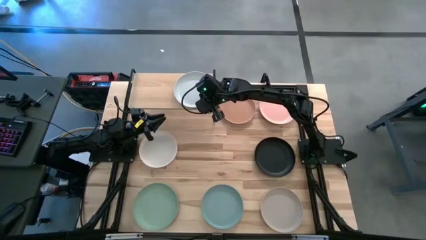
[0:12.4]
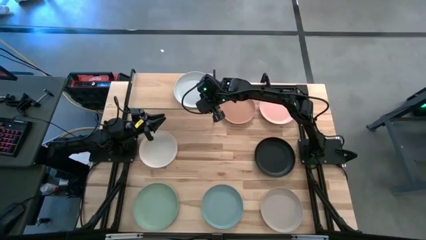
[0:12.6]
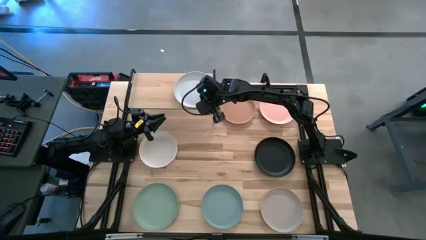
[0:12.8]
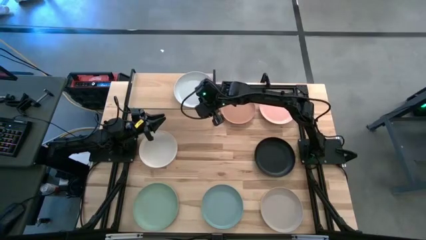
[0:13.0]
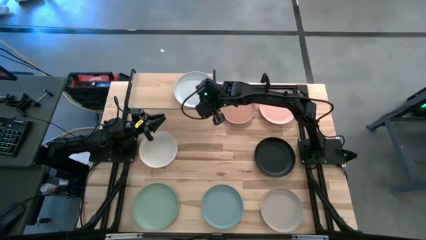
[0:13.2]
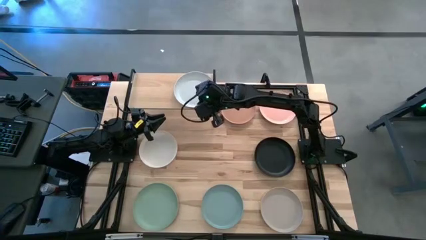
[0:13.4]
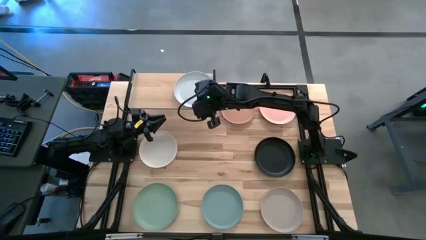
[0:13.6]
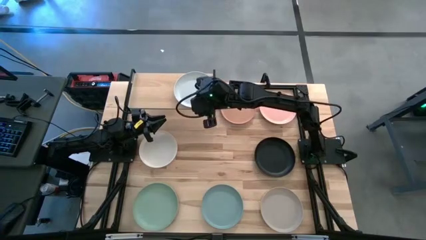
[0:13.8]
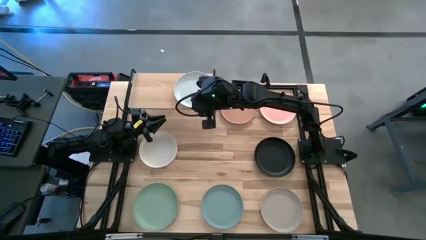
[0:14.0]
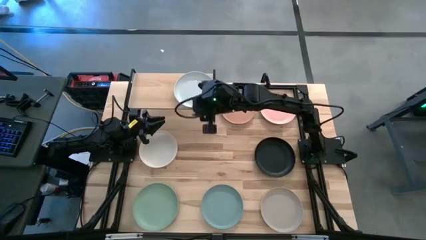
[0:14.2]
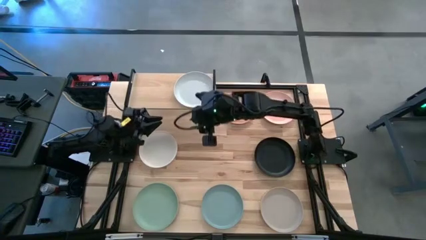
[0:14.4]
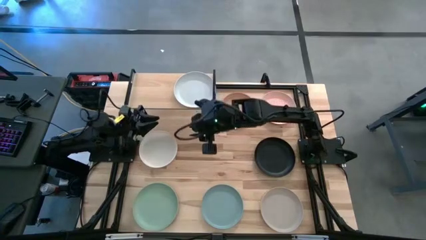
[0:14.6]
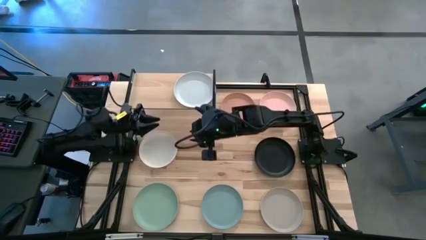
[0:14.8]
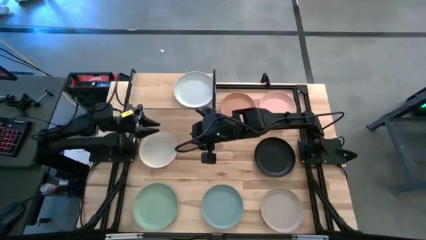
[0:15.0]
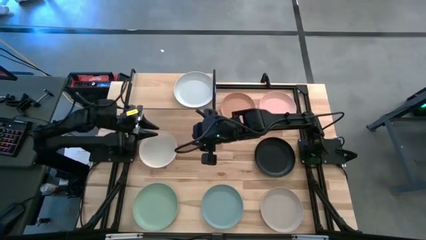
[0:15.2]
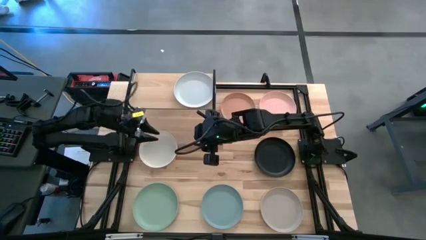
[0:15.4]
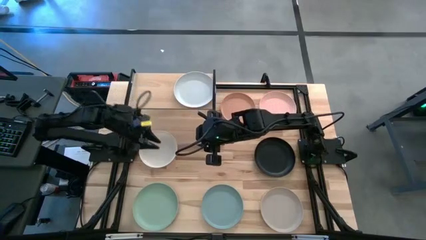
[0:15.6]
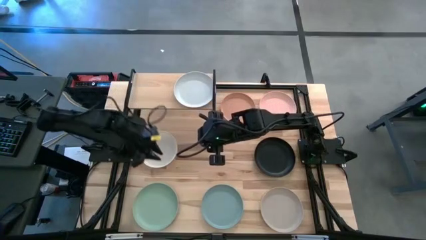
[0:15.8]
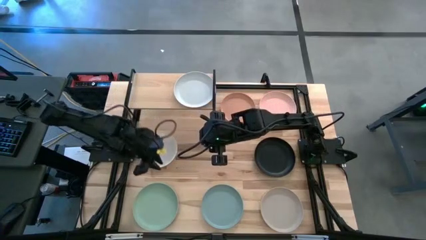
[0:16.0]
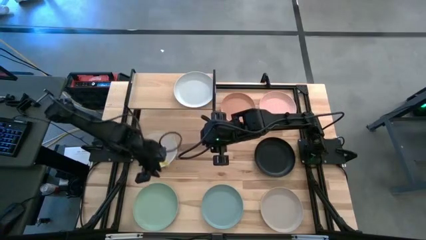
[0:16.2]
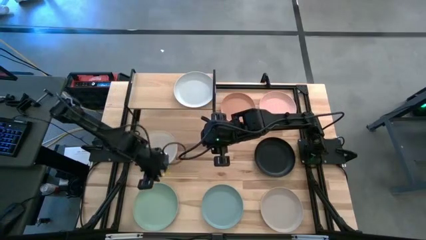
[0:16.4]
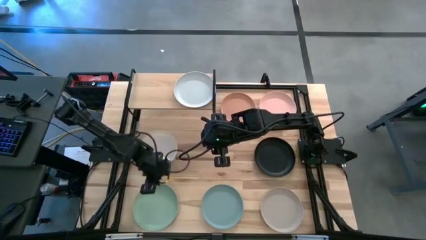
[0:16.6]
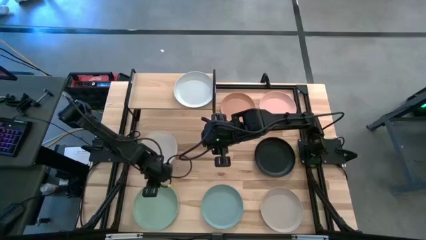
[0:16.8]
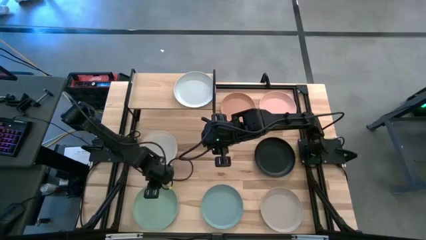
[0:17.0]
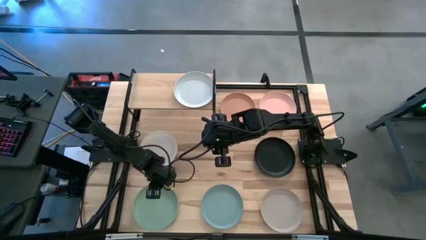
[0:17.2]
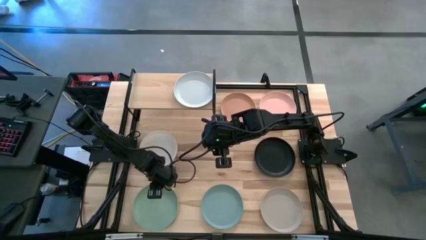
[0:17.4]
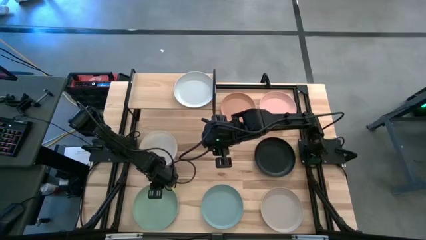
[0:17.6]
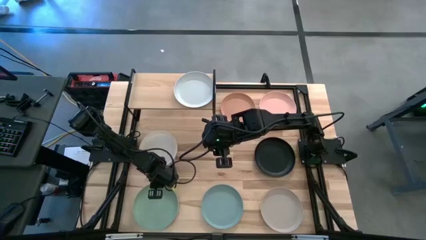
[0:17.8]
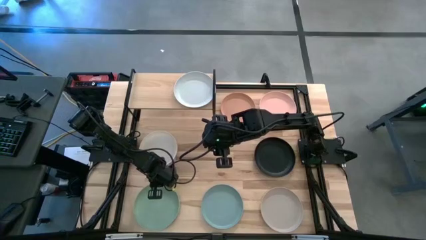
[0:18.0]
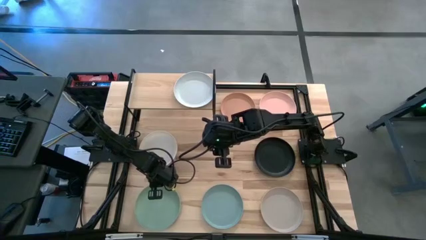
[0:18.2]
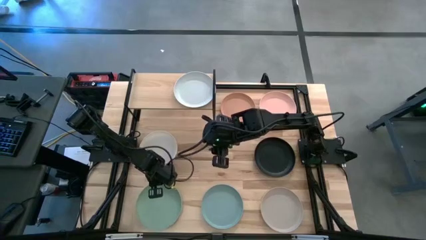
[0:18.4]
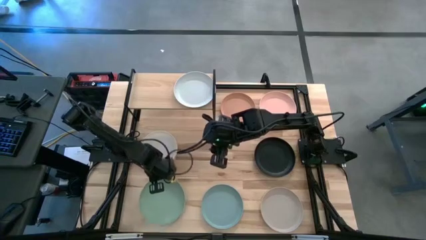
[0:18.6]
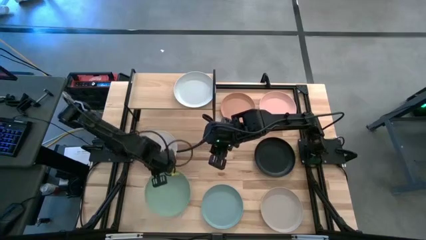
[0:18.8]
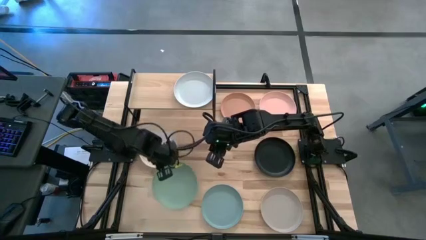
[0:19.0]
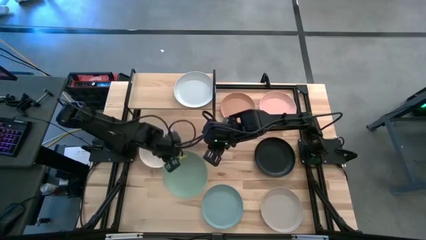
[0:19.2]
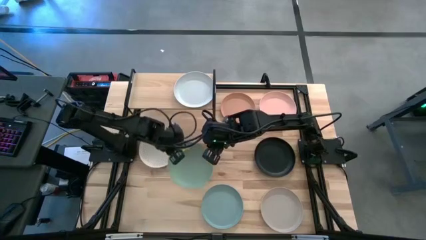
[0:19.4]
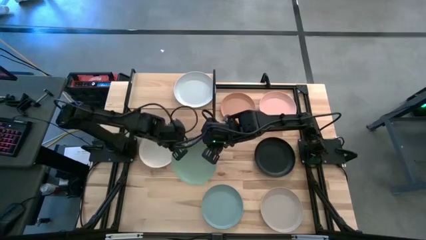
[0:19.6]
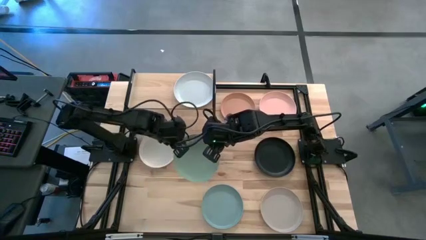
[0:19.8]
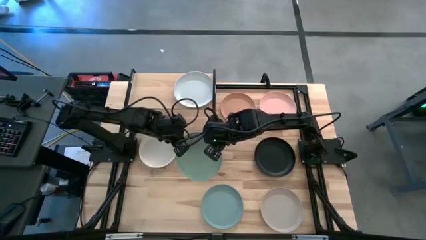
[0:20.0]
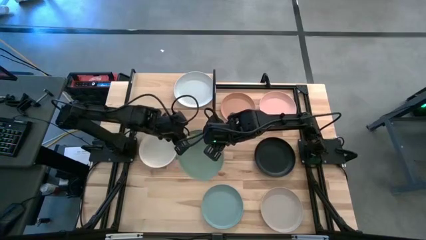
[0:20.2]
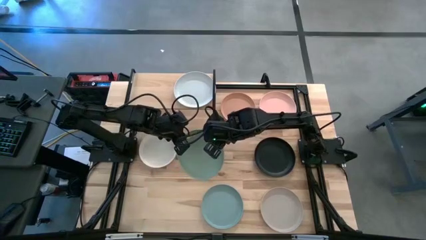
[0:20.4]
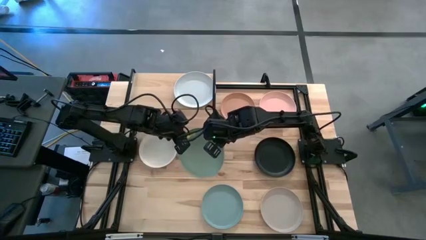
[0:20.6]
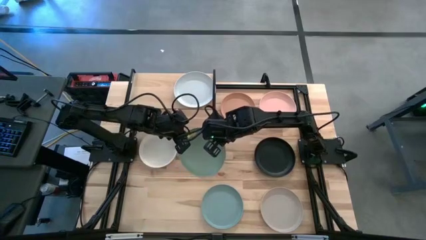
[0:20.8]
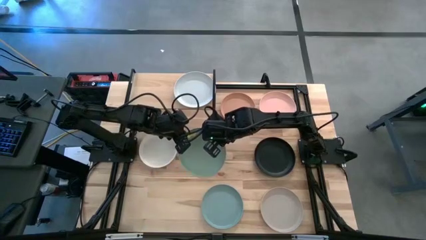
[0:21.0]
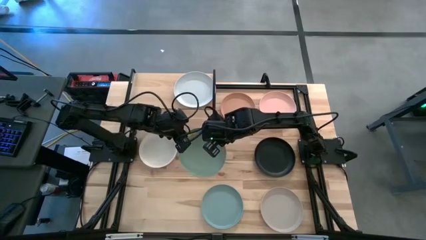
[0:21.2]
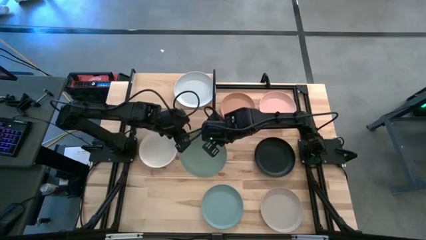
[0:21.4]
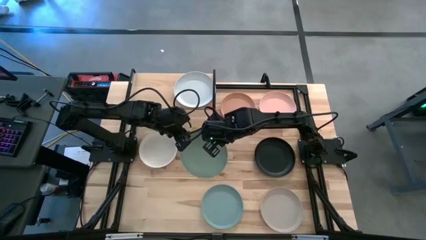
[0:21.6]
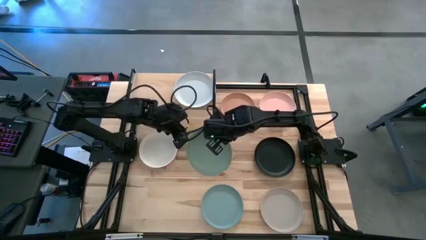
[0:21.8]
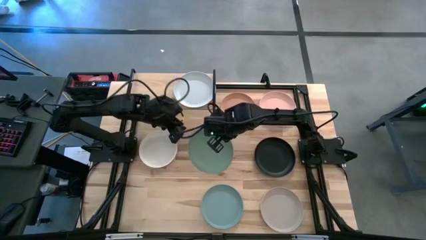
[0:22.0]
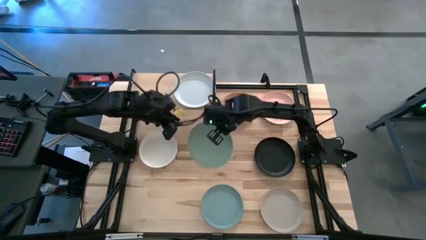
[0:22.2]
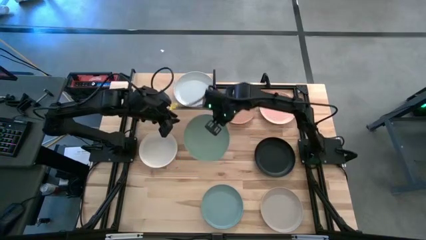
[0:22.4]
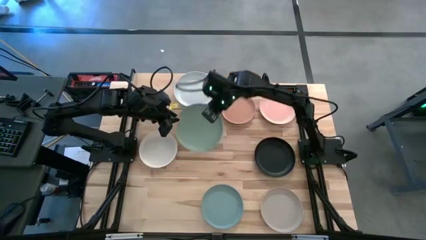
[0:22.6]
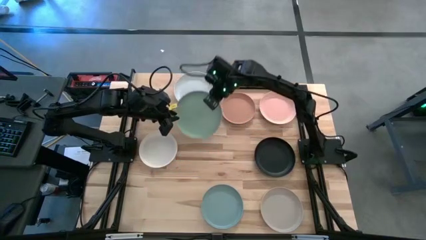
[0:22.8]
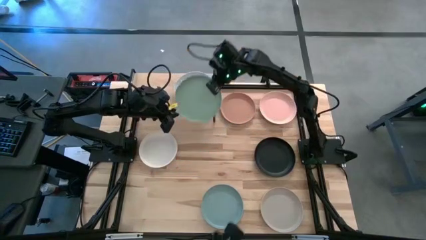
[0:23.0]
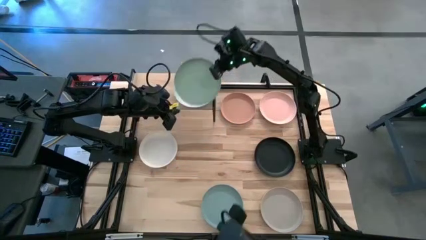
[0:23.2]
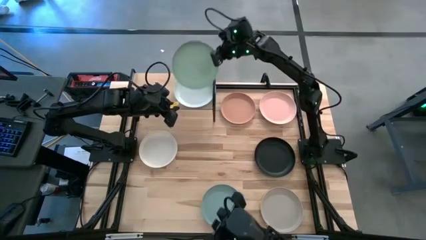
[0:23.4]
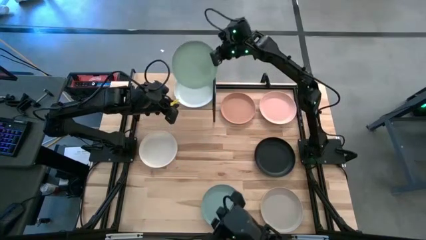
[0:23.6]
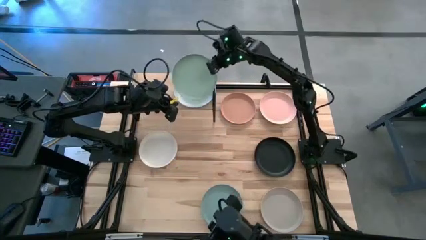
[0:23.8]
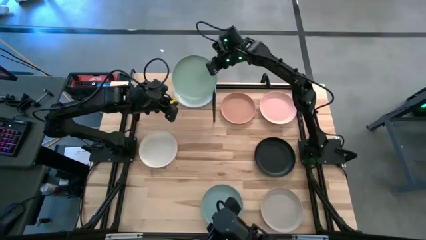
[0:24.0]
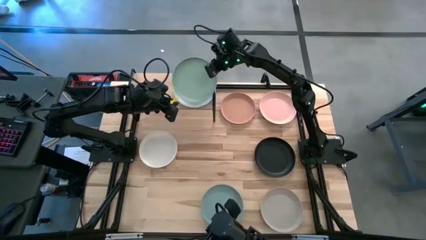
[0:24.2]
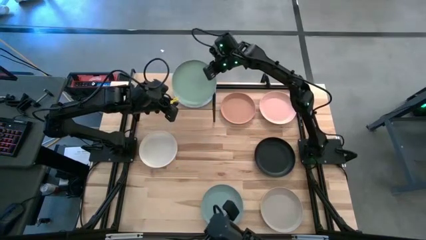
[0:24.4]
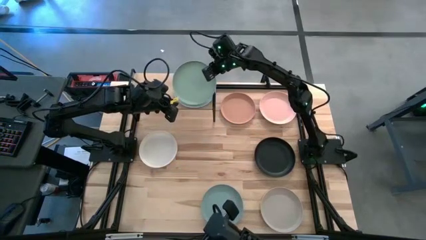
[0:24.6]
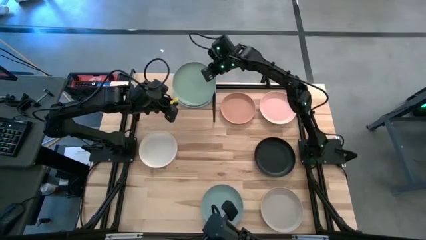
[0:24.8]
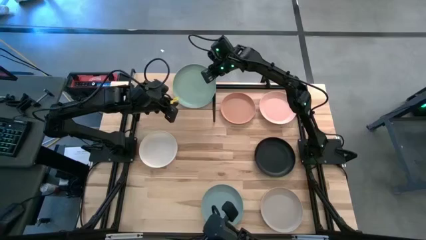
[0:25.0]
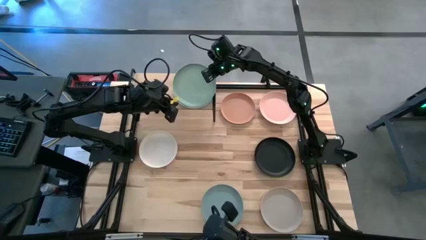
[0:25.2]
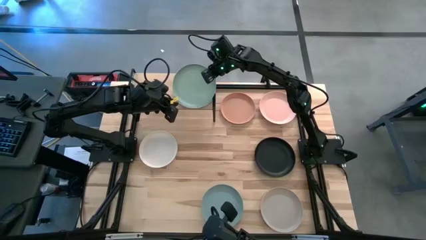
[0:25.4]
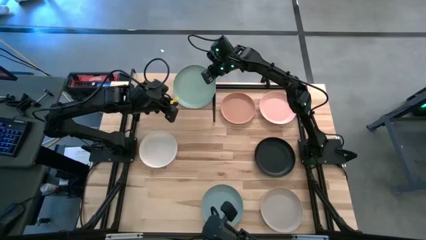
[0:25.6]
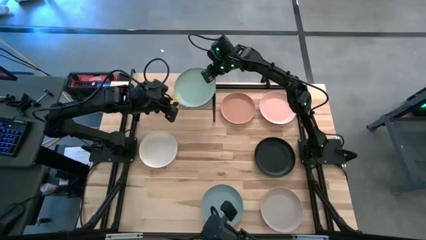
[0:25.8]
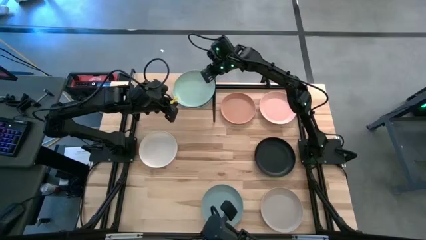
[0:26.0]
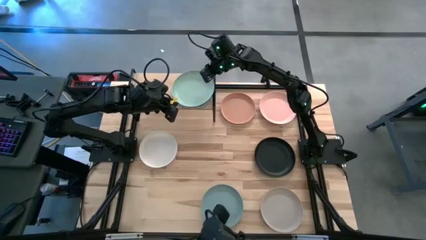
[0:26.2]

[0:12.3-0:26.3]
Task: Place and stack plates onto a shelf
Stack the green plate on top of the light blue plate on the shelf
